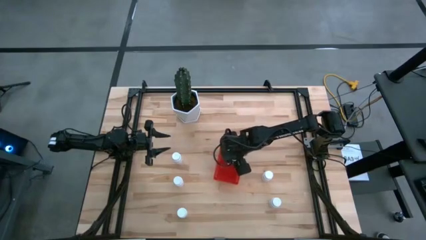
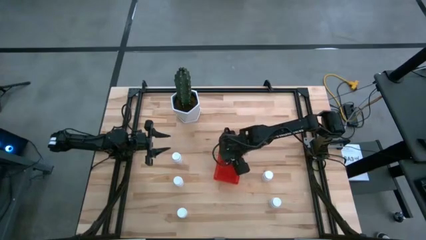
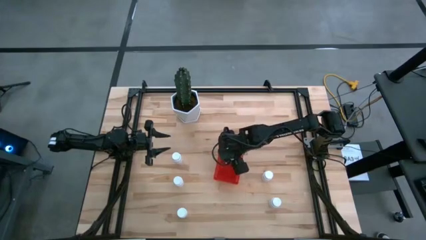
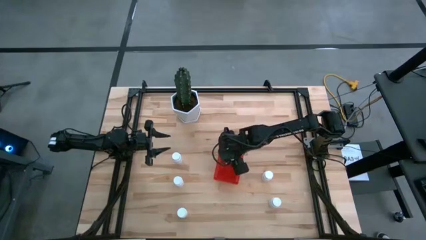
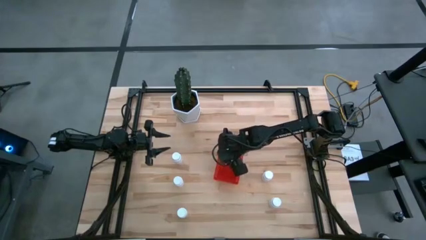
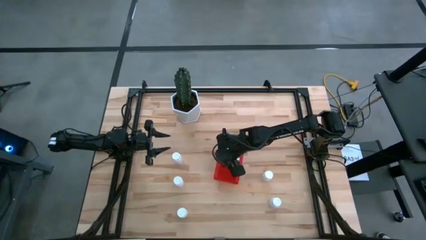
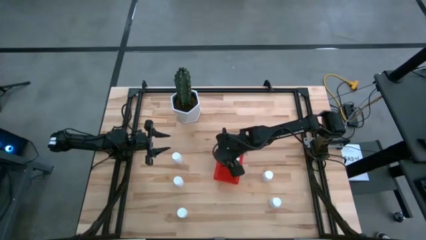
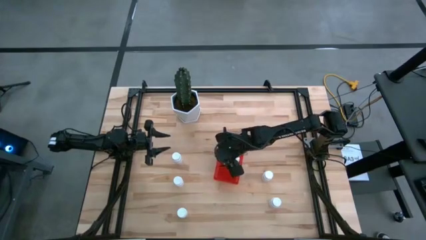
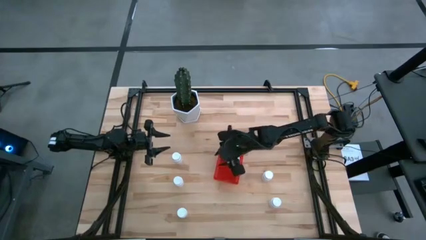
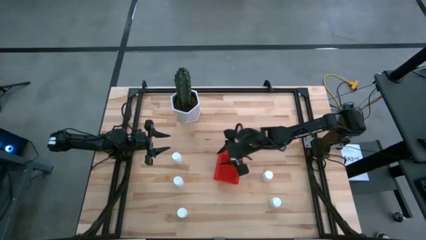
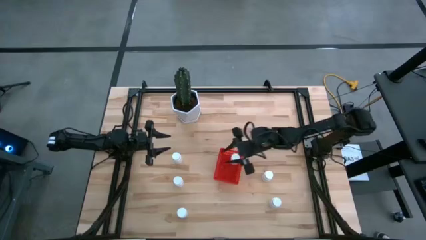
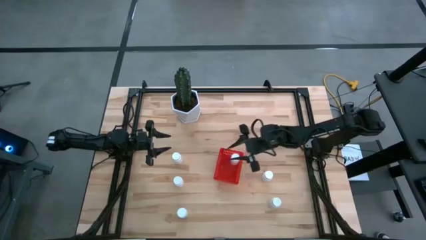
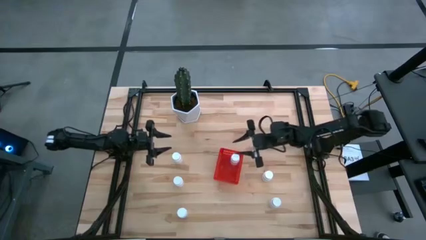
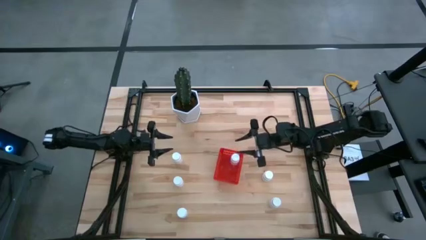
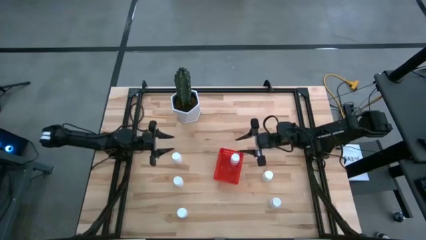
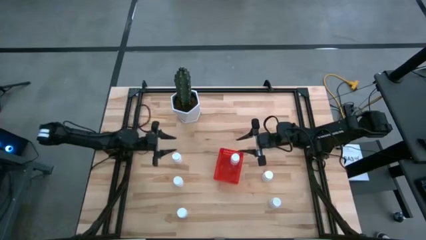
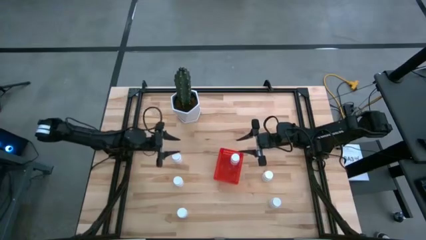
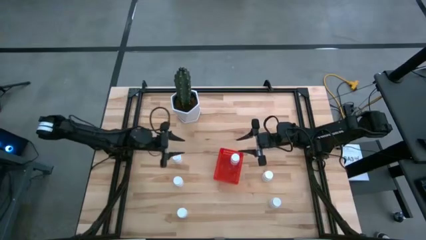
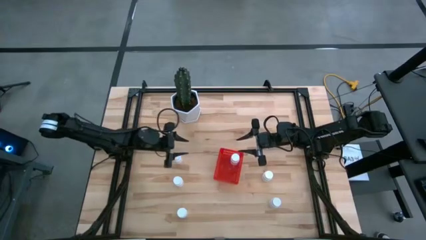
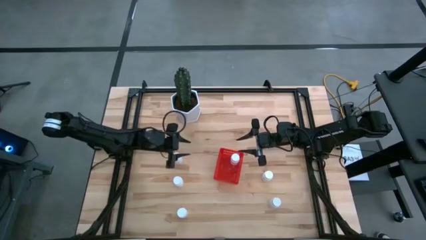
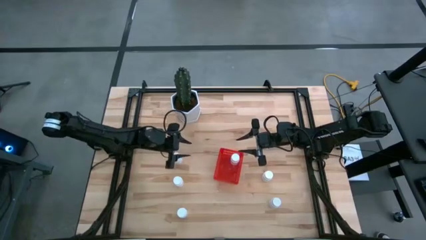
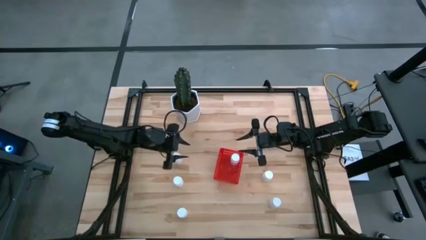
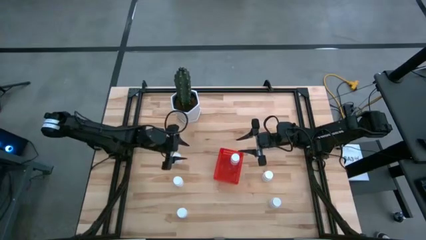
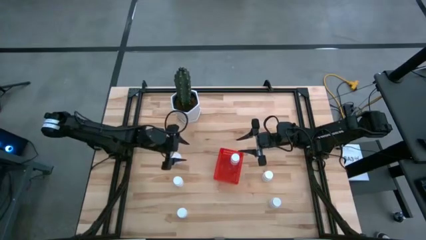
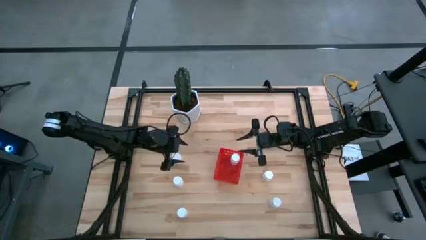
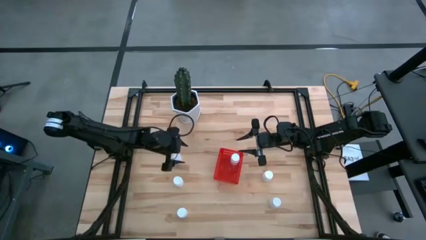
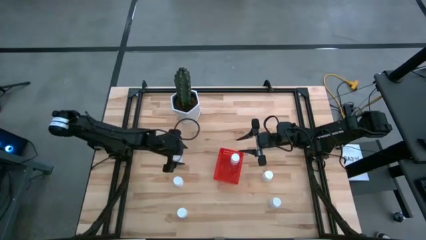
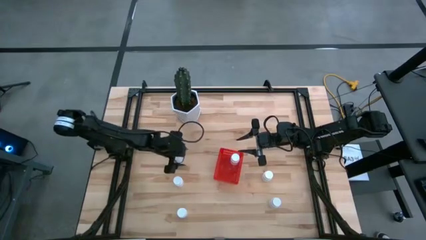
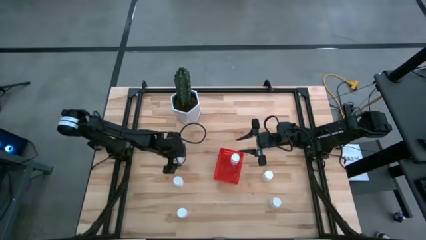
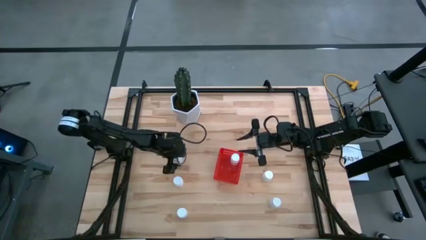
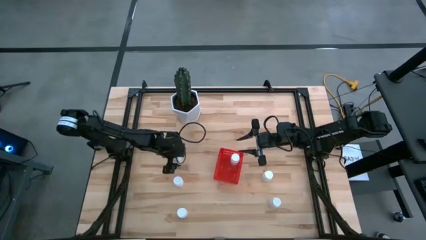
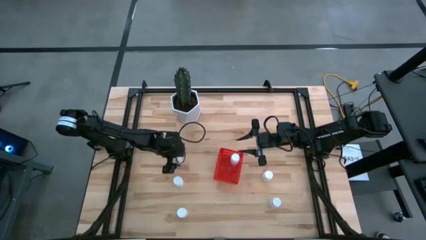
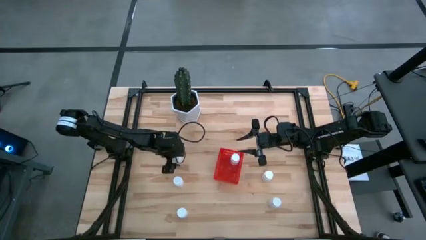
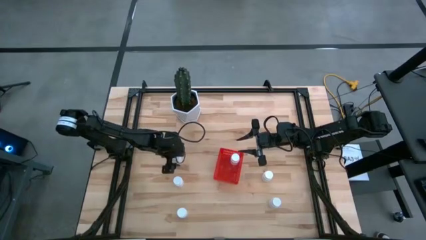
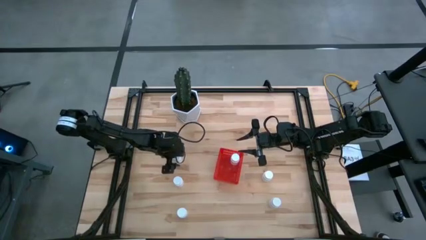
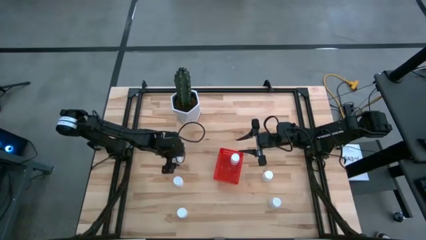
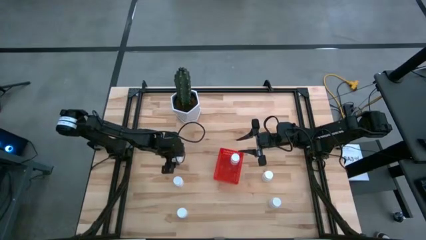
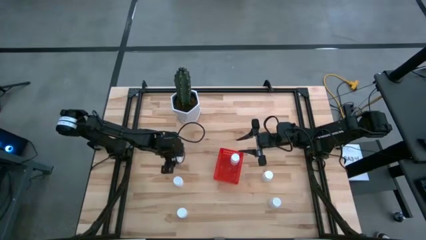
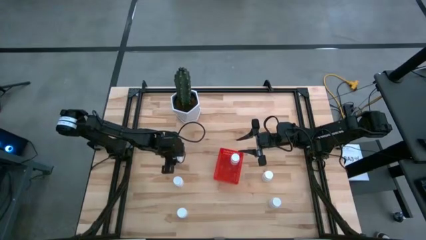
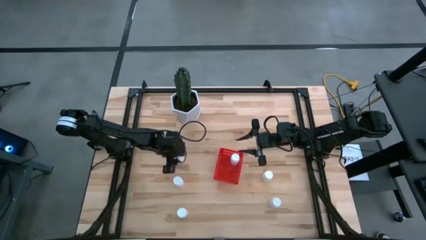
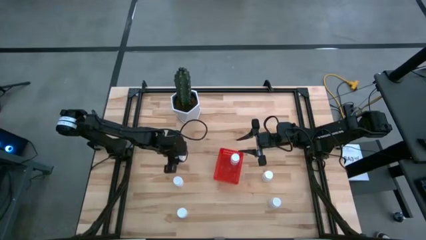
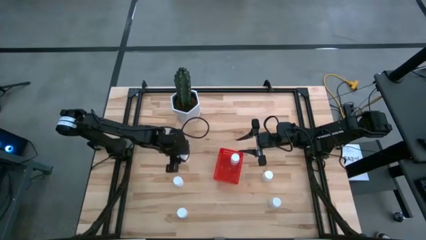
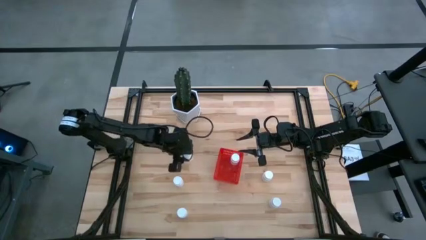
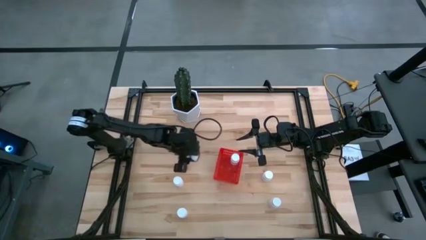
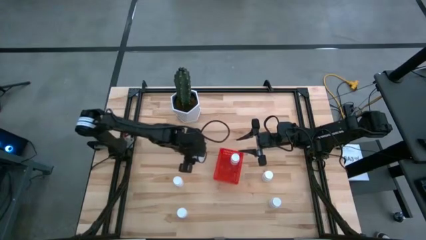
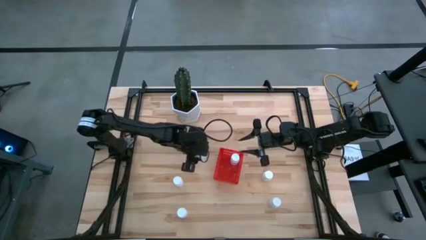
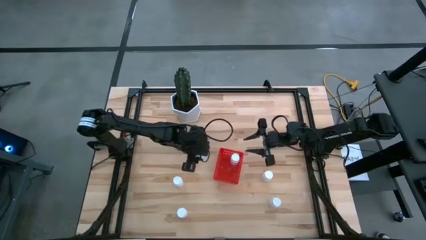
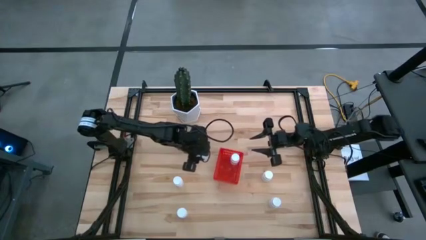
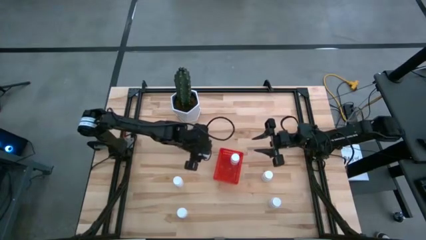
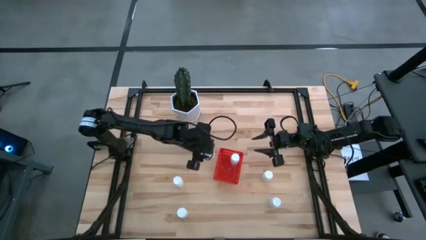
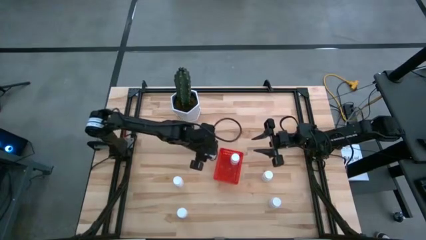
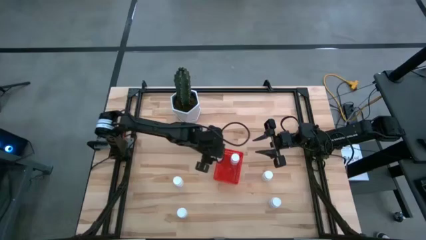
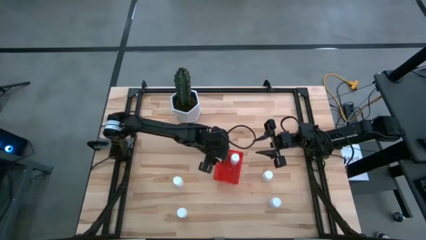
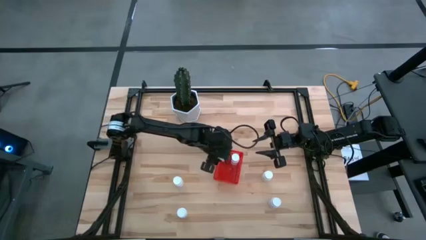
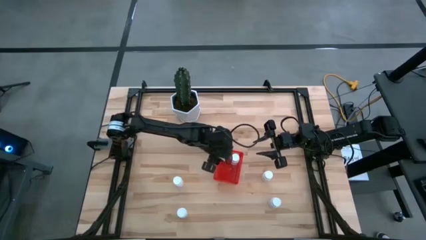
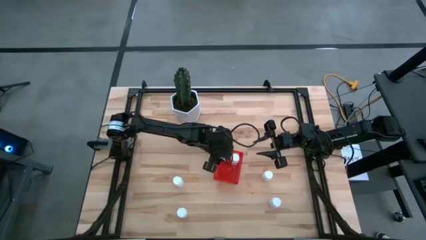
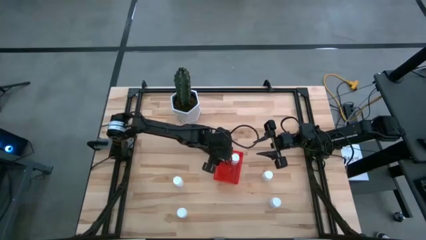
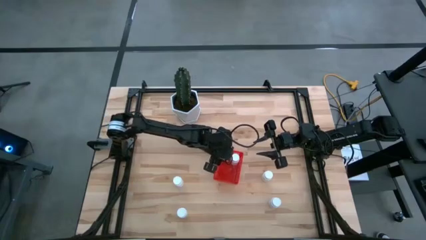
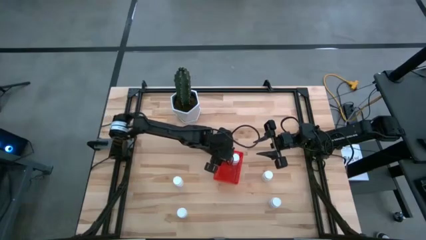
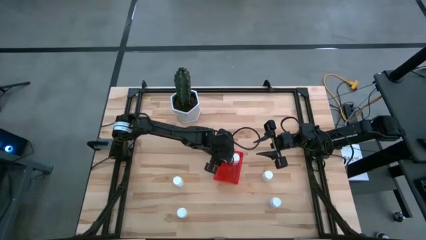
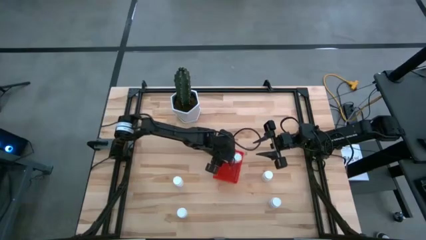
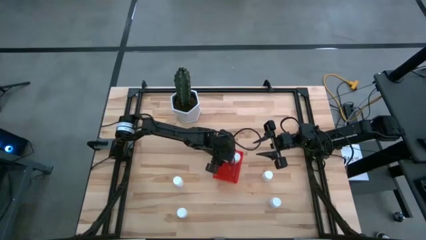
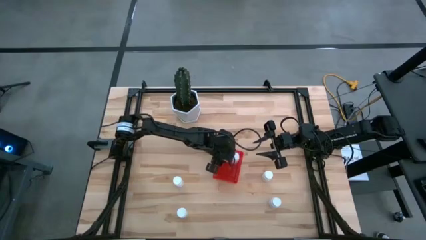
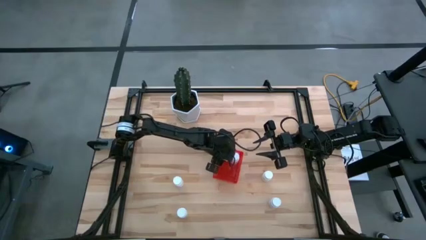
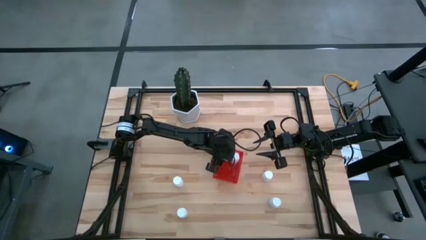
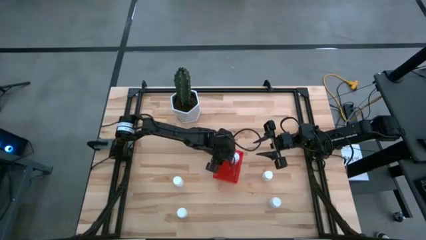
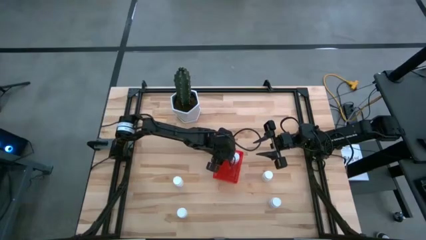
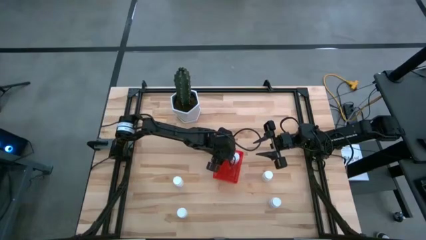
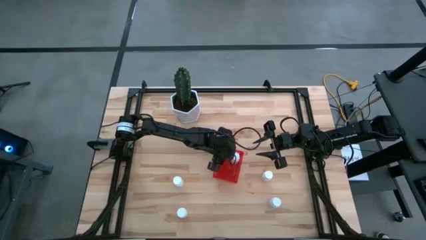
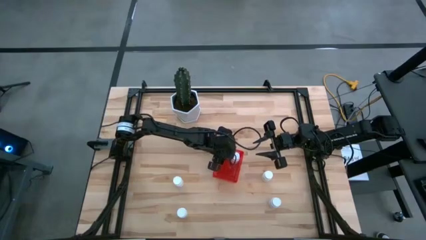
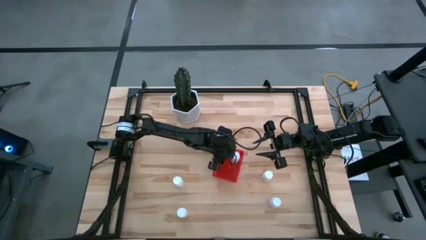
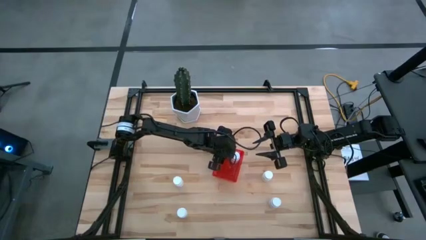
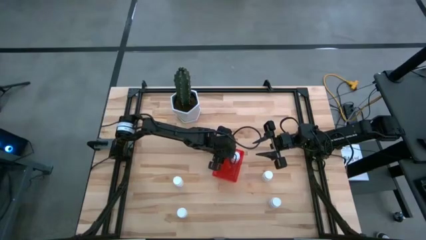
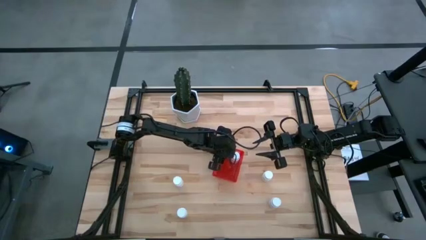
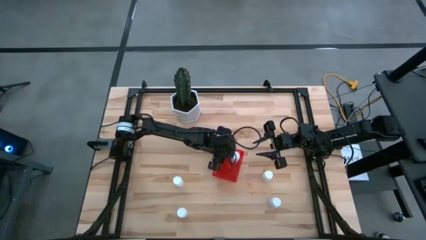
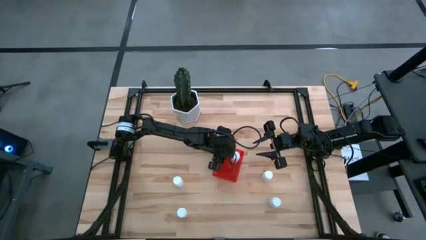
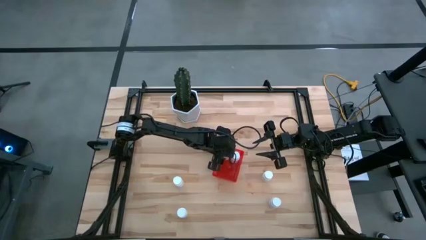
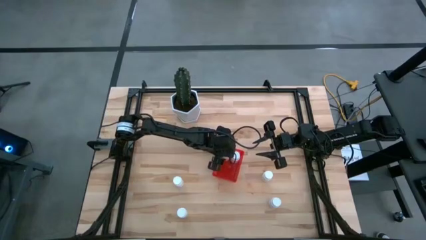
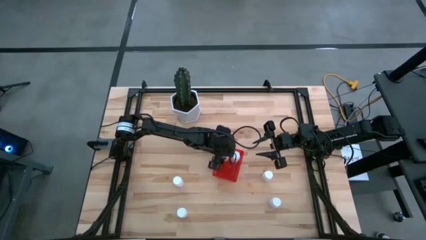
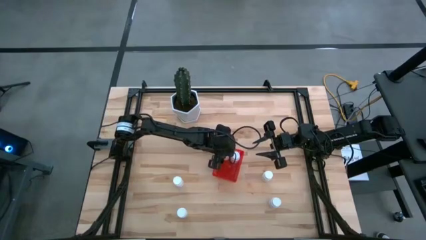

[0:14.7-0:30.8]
Task: Pick and place pill bottles into a basket
Put the white pill bottle into the red bin
